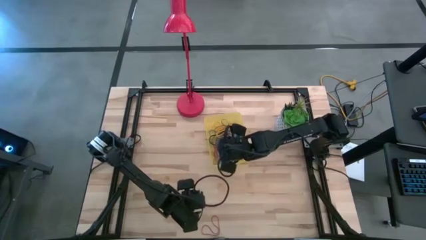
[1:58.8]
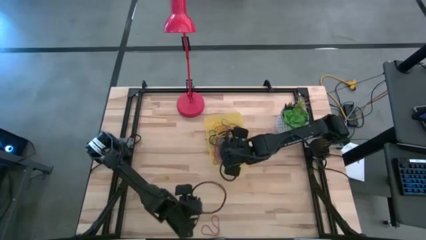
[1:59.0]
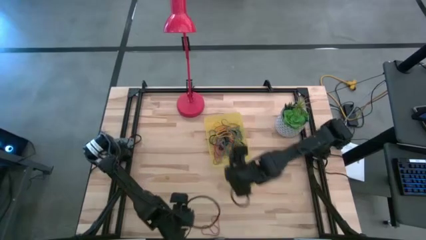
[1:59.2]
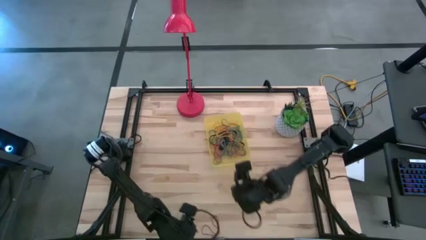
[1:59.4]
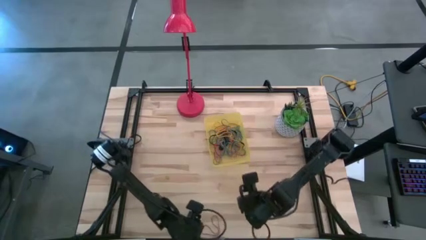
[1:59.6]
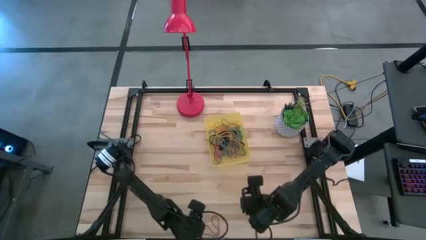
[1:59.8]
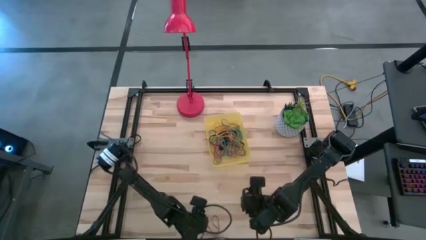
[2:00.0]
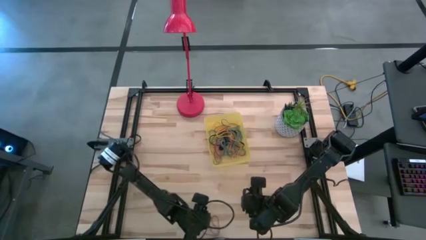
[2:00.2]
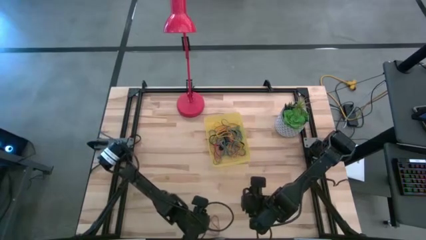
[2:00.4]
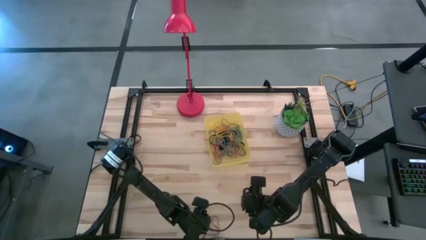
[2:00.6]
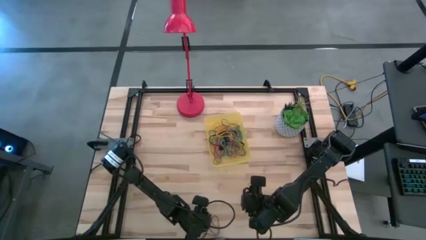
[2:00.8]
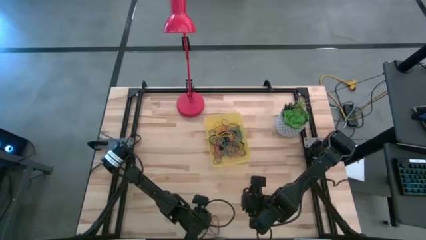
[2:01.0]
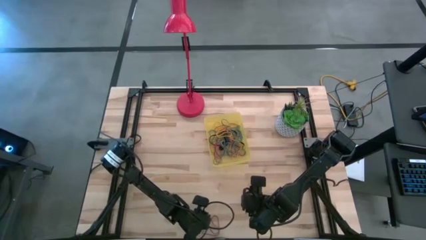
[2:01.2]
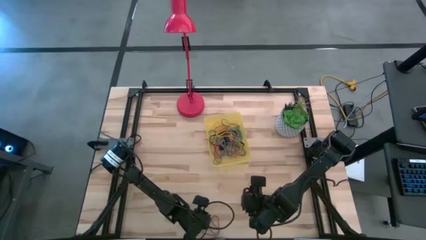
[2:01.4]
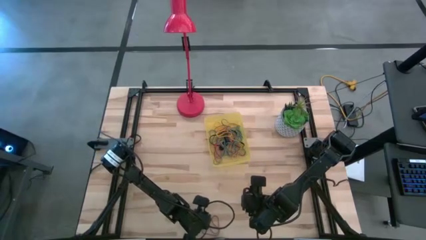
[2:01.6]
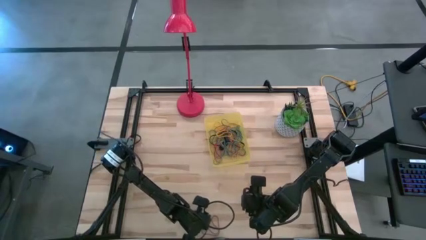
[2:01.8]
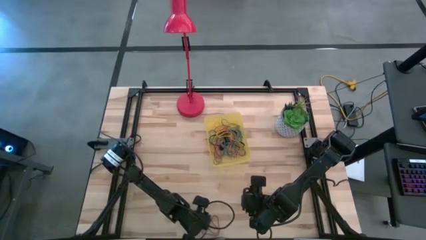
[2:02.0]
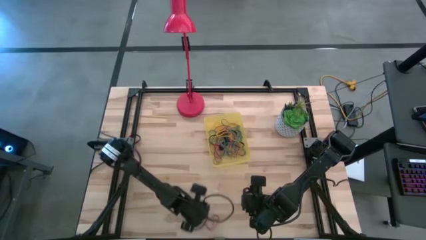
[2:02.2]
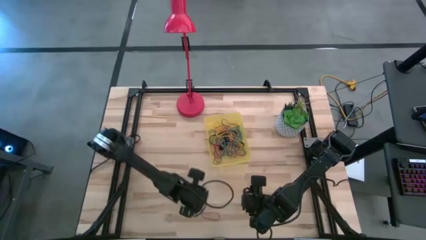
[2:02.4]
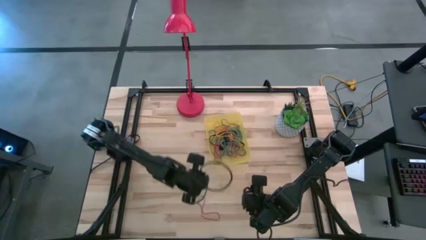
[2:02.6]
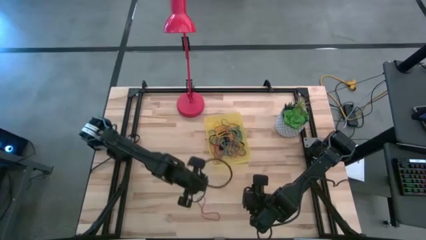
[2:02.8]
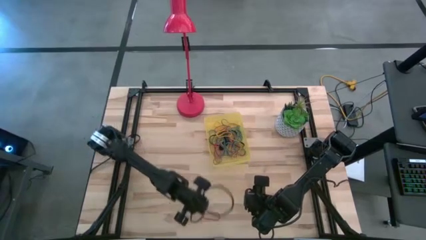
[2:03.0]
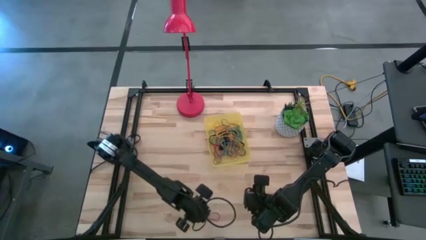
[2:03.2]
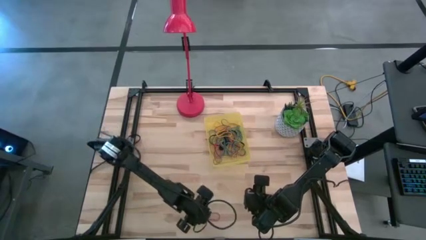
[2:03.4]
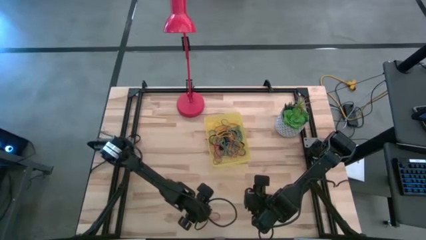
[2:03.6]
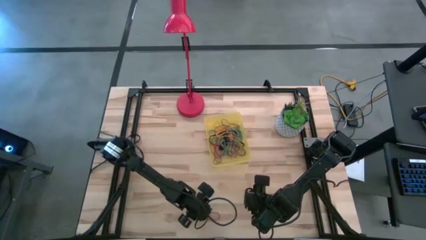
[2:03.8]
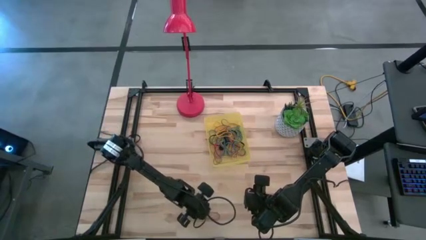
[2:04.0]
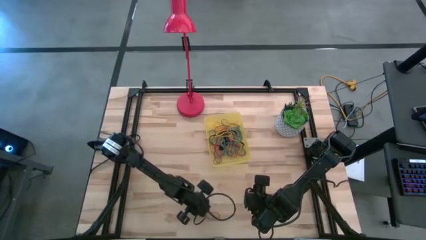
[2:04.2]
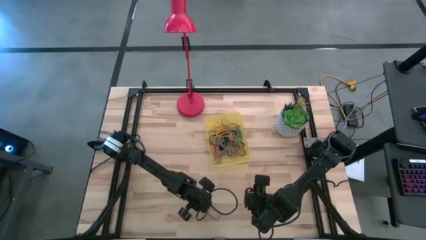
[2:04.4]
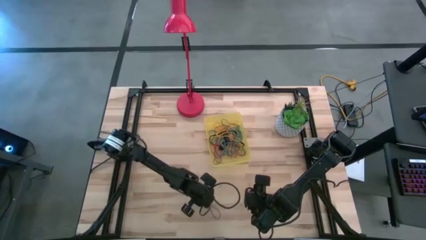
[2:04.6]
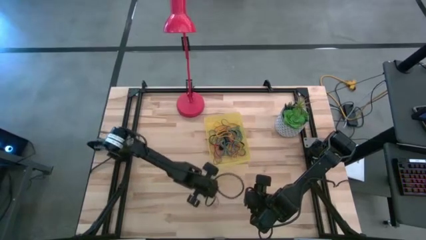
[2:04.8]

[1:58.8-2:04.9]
Task: Pick and place rubber bands into bin
Put the red rubber band into the yellow bin

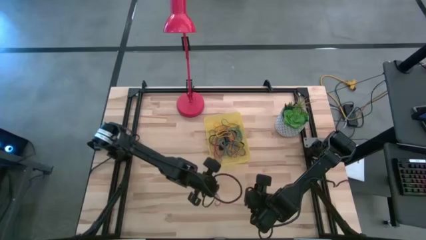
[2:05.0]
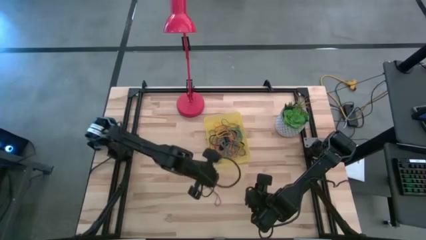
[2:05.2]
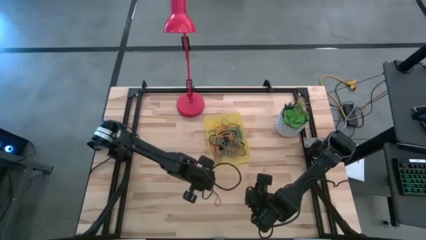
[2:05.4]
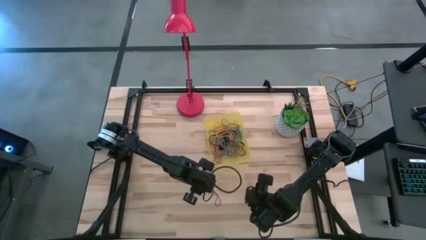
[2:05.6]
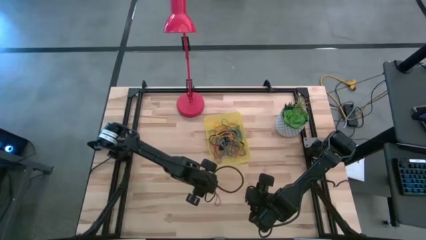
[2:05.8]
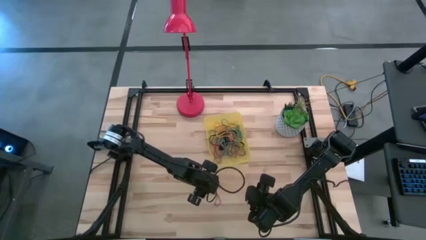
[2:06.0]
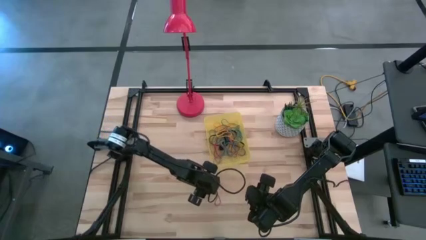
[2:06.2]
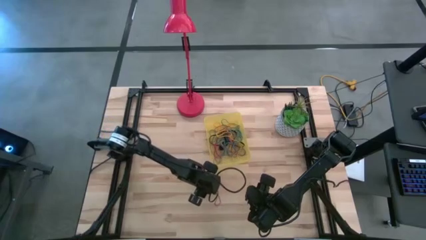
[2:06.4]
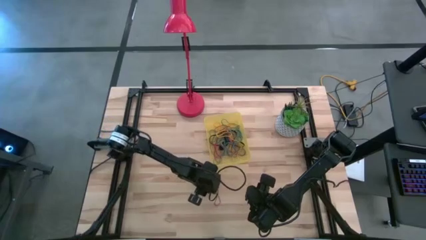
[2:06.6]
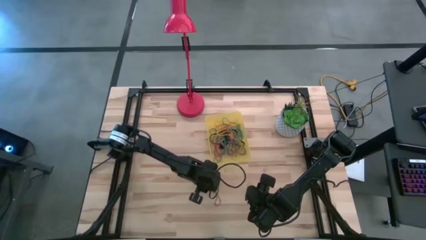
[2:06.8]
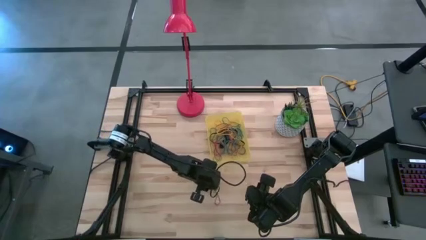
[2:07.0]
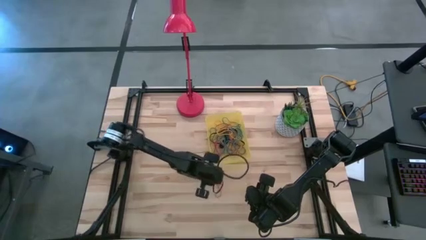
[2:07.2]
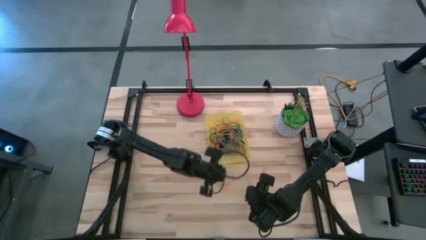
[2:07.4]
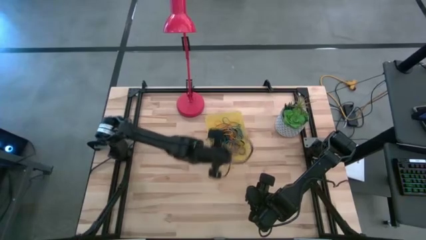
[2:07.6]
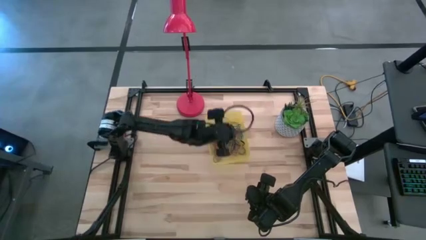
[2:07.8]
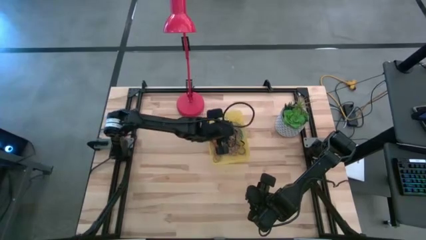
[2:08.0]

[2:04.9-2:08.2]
Put the red rubber band into the yellow bin

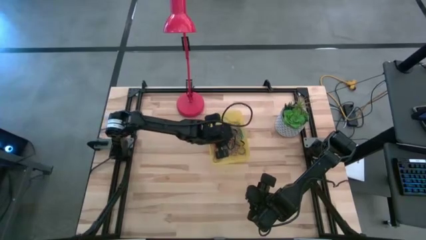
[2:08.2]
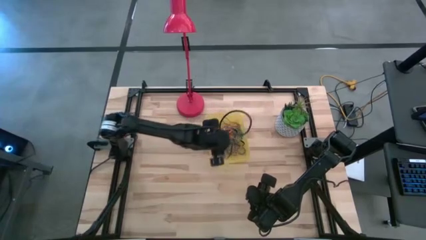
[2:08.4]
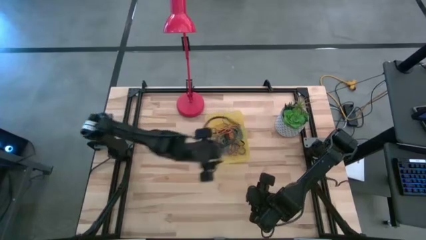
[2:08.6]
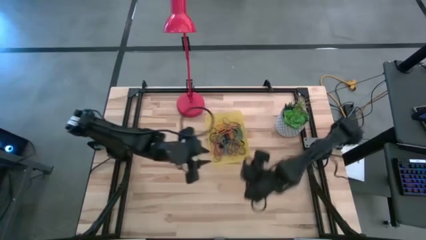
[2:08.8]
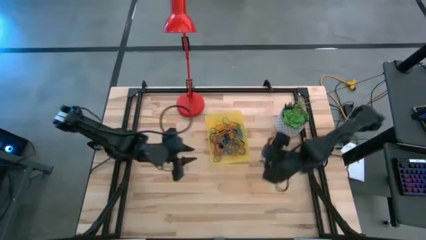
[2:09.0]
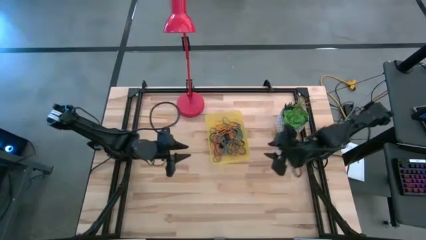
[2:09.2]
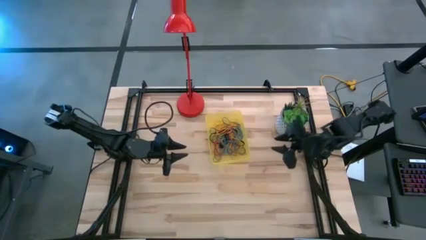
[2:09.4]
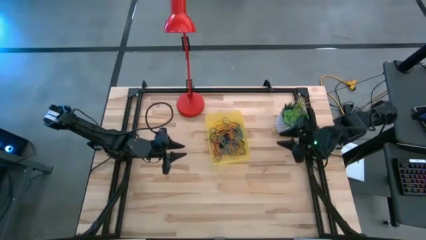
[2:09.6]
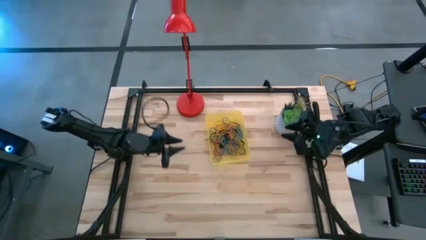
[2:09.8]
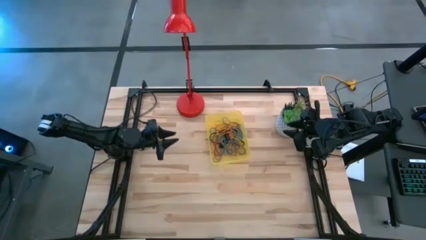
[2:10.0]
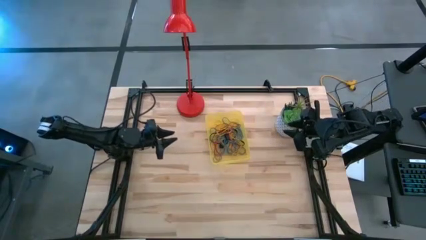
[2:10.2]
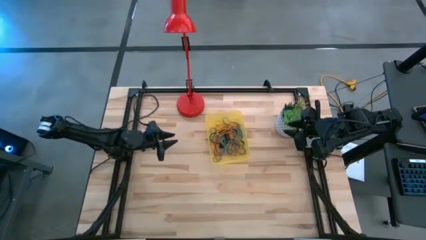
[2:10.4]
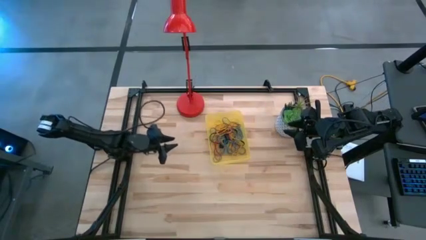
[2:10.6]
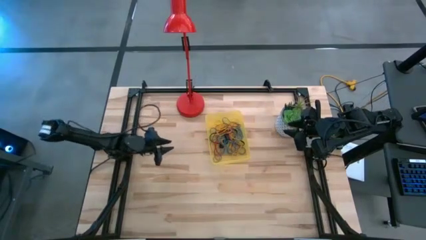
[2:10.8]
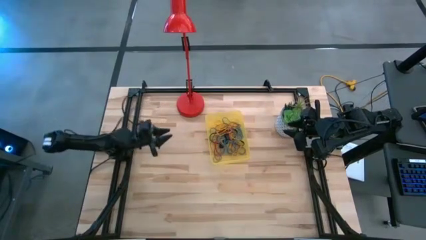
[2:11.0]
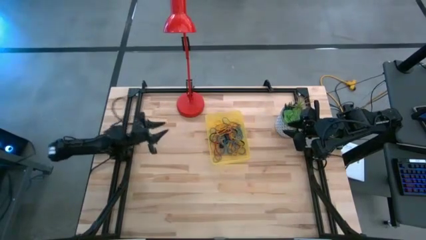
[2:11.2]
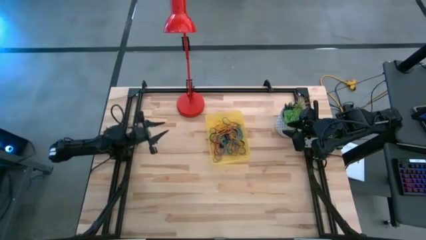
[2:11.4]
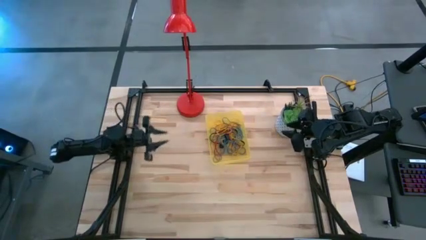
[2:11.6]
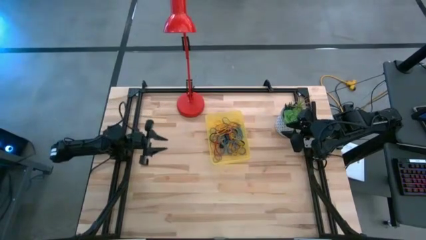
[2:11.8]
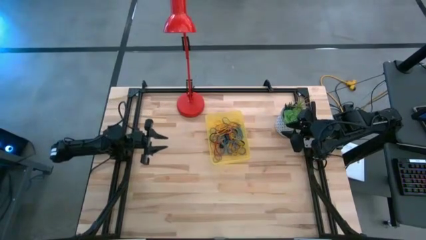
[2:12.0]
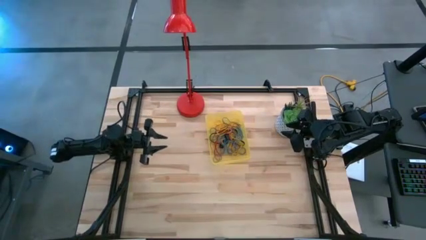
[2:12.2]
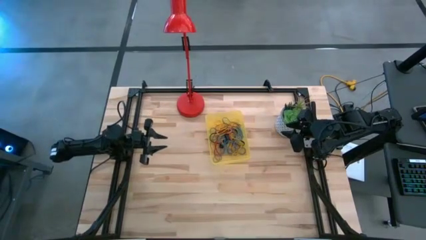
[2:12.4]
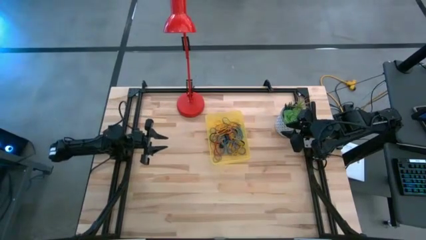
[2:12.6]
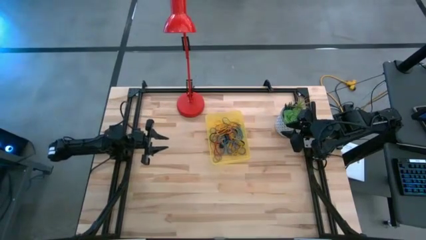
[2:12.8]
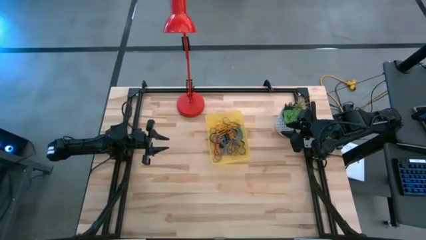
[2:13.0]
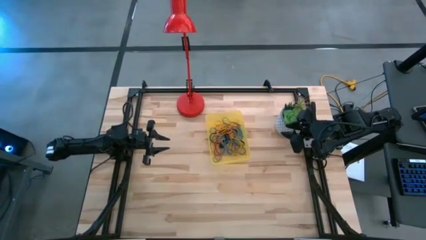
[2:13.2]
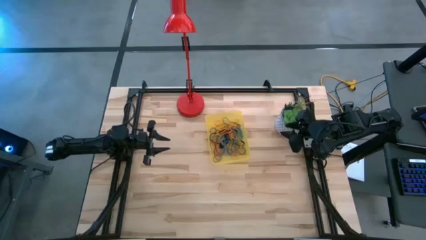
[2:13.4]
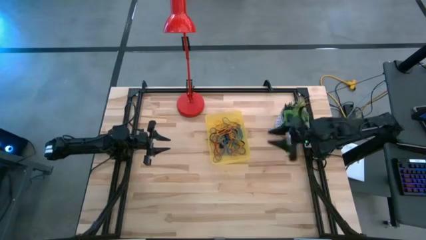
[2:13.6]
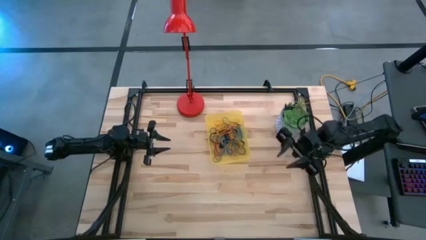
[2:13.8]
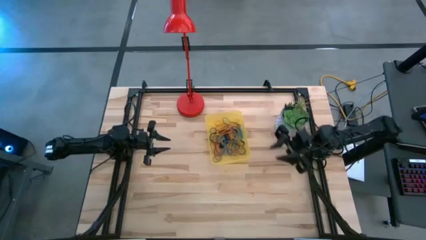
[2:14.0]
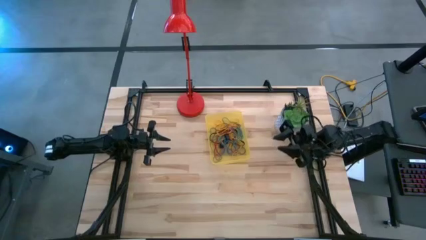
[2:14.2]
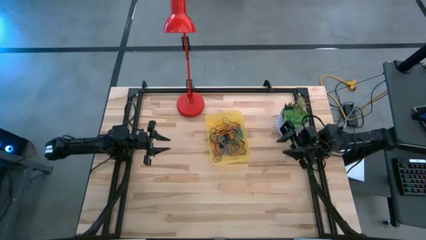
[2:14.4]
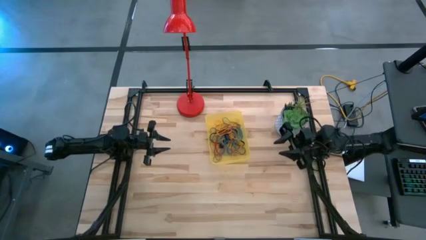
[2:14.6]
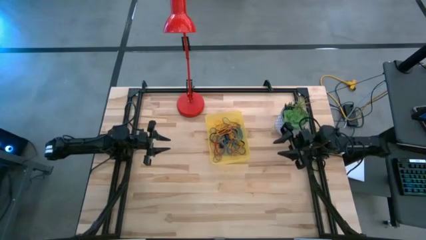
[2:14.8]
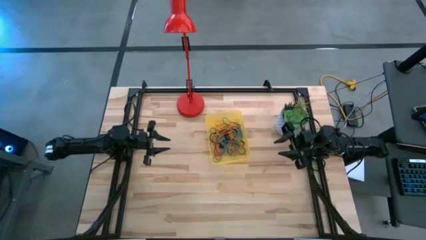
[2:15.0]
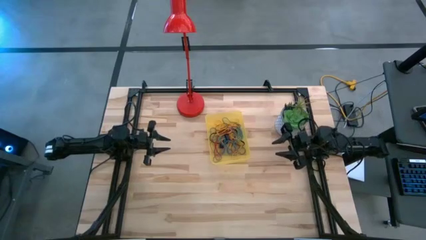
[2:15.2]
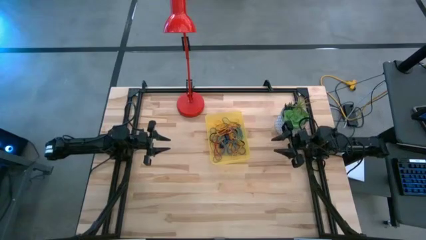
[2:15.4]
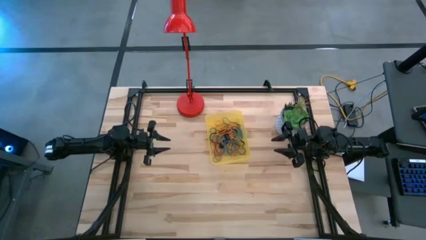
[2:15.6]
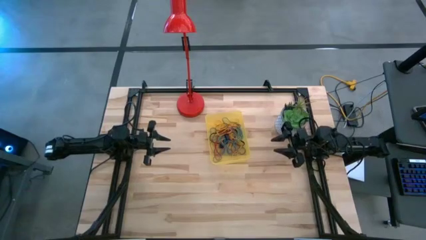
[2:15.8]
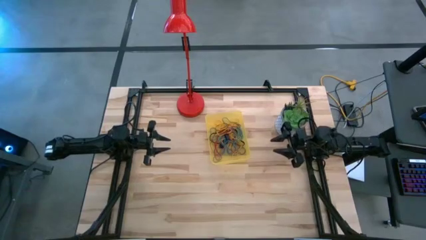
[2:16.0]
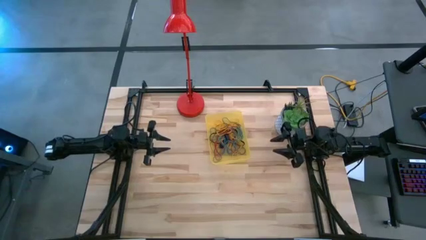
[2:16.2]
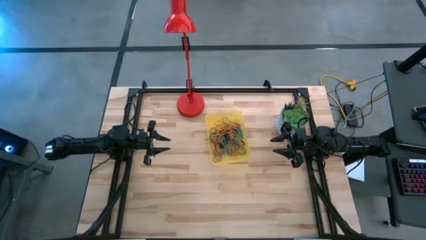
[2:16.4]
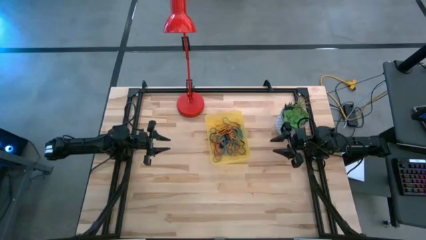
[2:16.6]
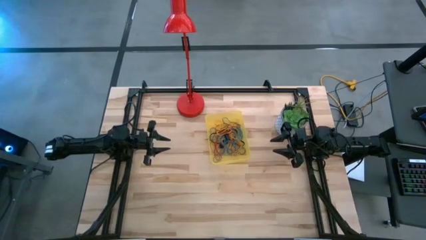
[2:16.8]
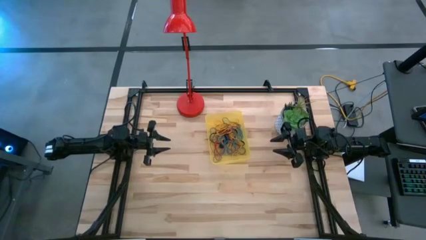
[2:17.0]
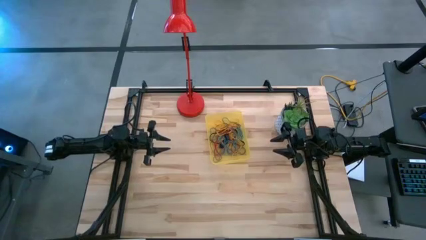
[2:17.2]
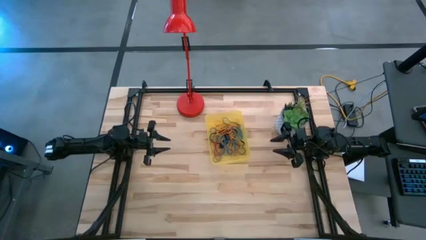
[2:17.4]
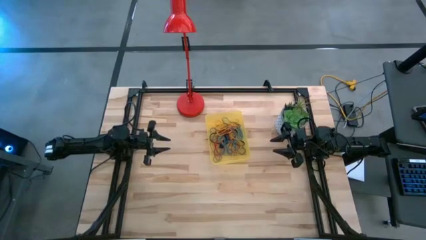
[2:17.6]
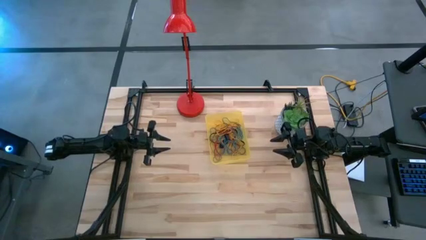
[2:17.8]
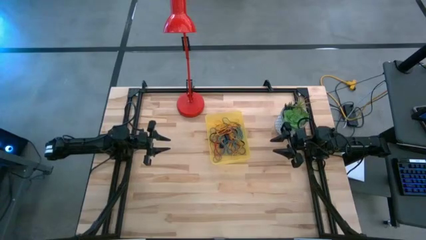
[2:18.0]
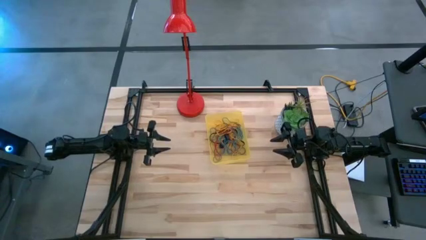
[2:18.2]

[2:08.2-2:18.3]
Return to Home Position
